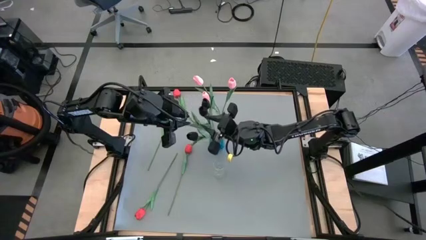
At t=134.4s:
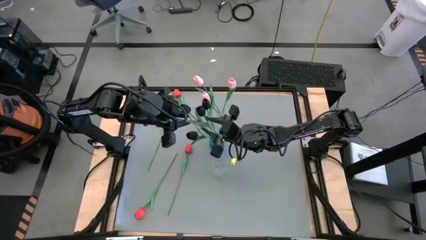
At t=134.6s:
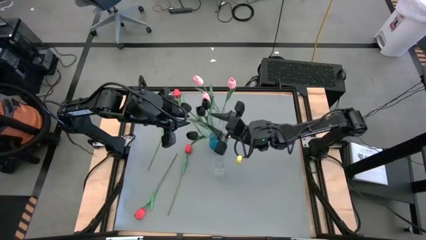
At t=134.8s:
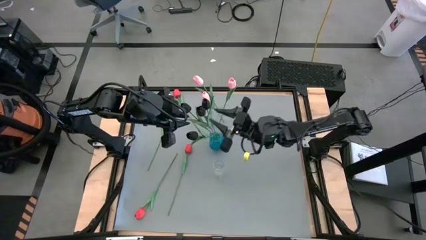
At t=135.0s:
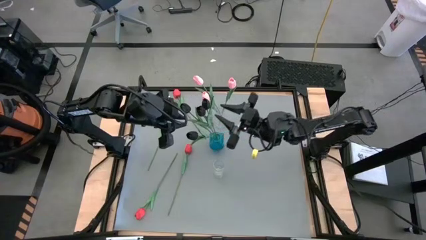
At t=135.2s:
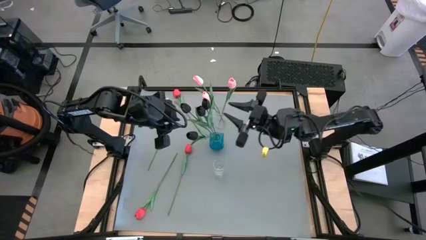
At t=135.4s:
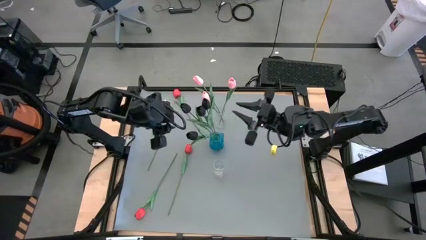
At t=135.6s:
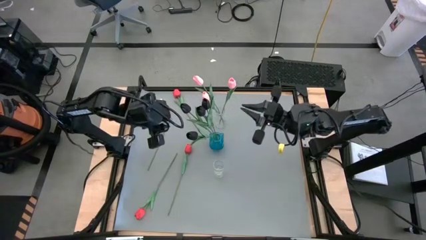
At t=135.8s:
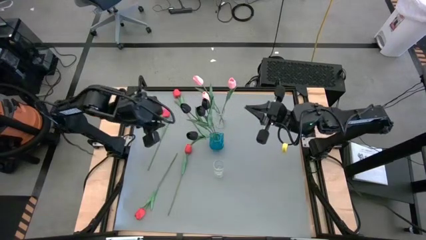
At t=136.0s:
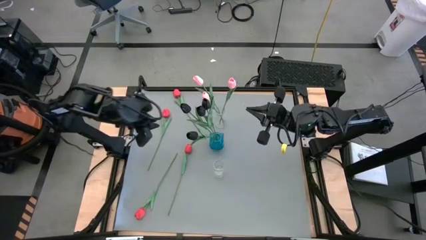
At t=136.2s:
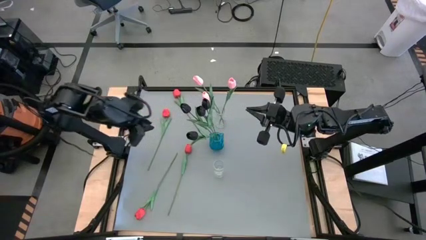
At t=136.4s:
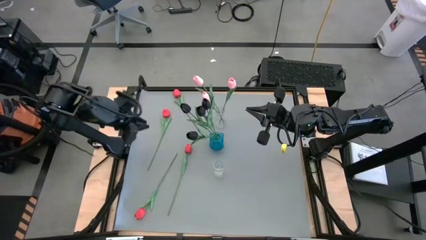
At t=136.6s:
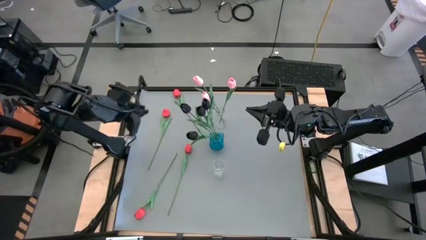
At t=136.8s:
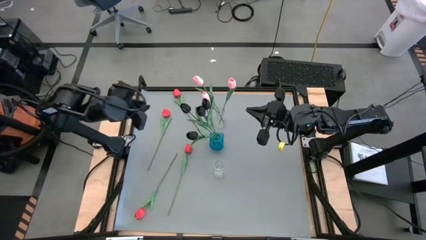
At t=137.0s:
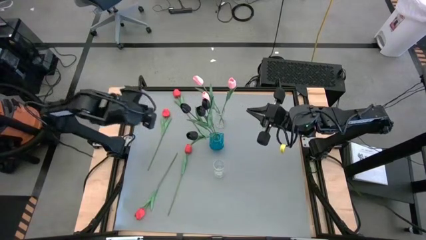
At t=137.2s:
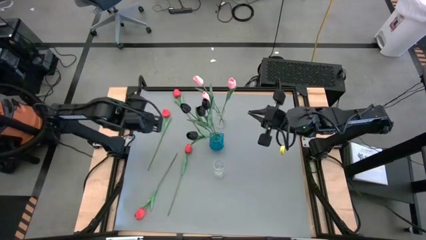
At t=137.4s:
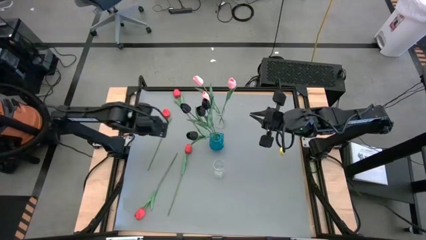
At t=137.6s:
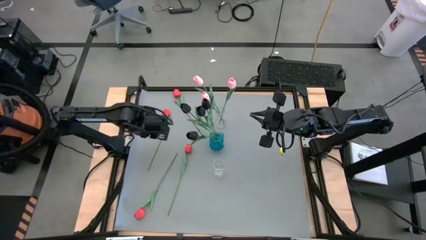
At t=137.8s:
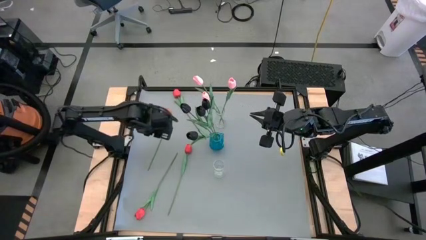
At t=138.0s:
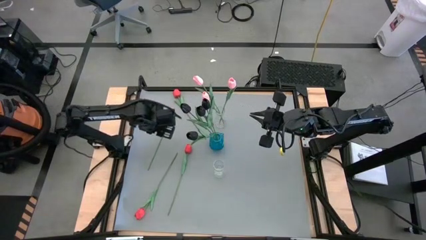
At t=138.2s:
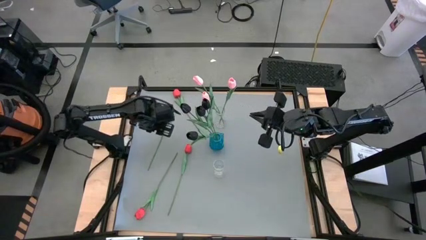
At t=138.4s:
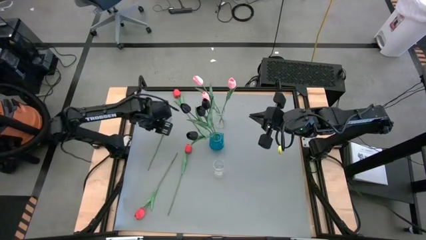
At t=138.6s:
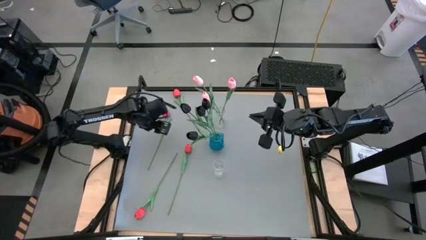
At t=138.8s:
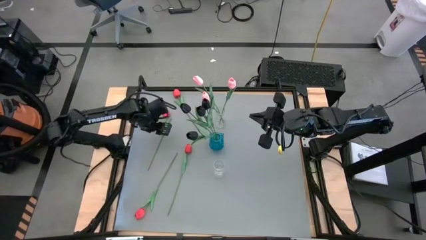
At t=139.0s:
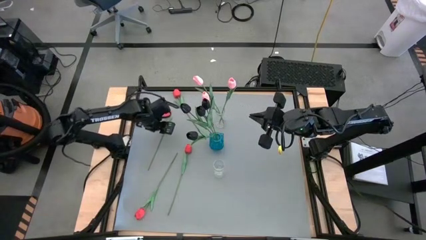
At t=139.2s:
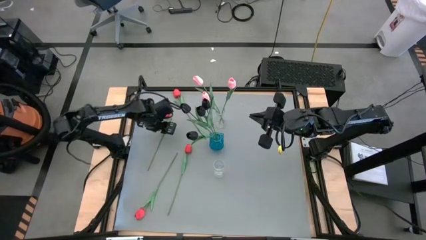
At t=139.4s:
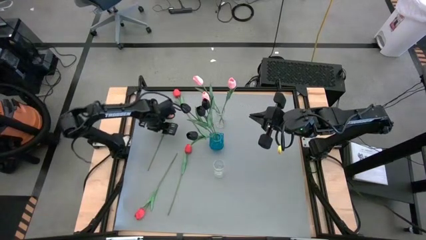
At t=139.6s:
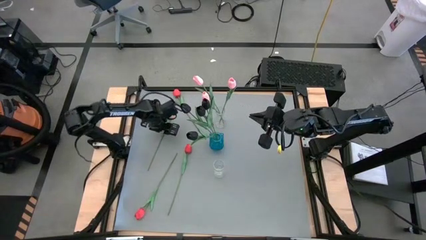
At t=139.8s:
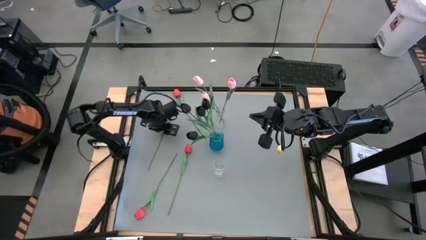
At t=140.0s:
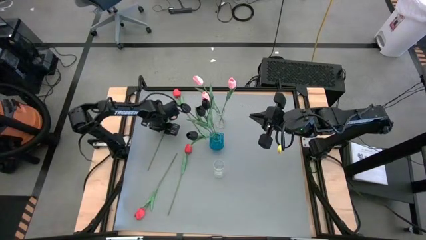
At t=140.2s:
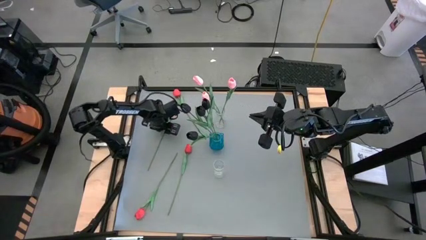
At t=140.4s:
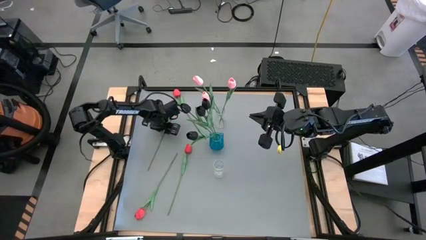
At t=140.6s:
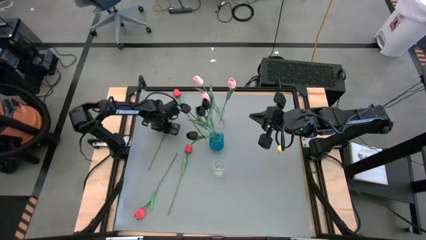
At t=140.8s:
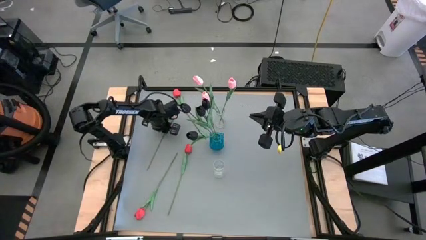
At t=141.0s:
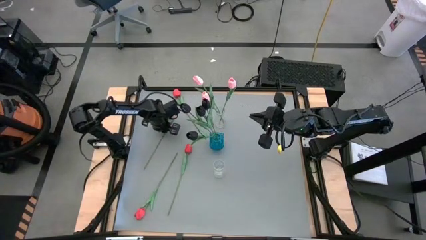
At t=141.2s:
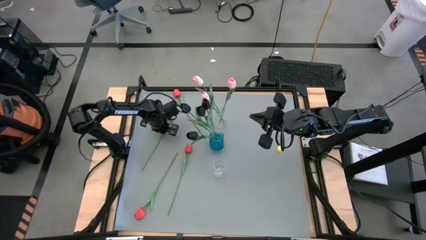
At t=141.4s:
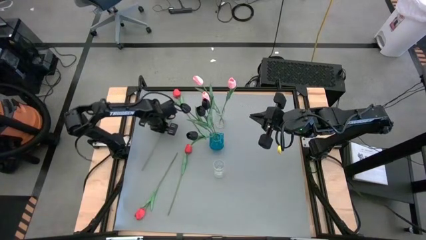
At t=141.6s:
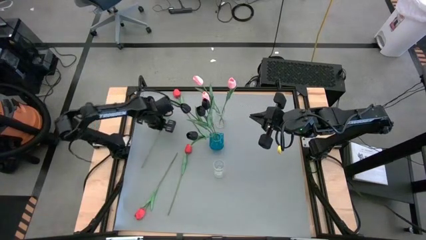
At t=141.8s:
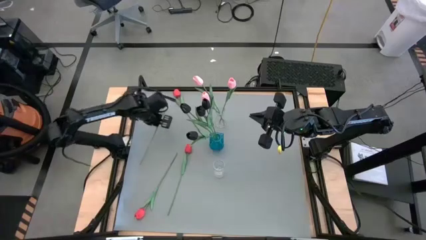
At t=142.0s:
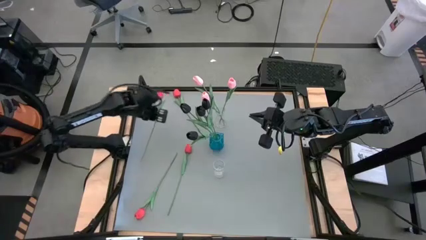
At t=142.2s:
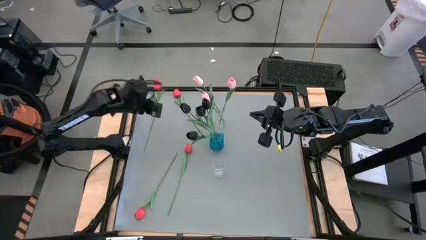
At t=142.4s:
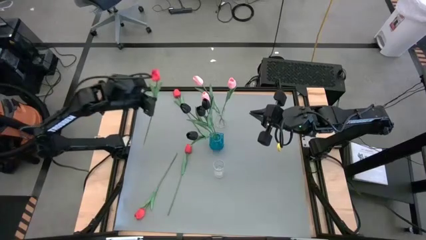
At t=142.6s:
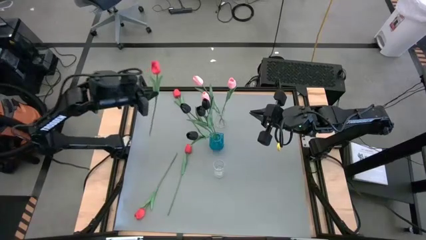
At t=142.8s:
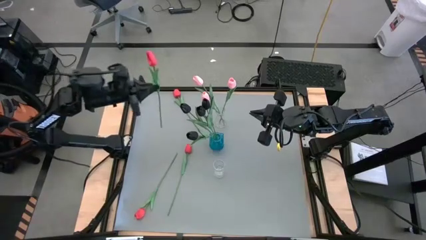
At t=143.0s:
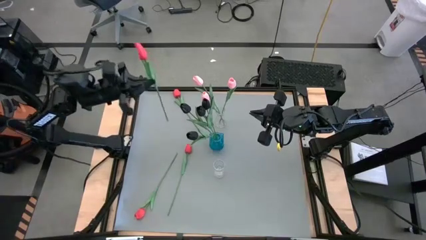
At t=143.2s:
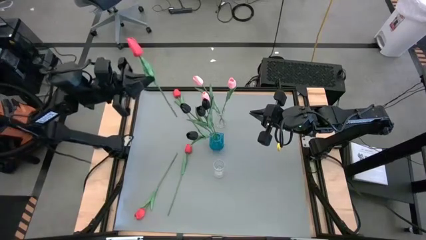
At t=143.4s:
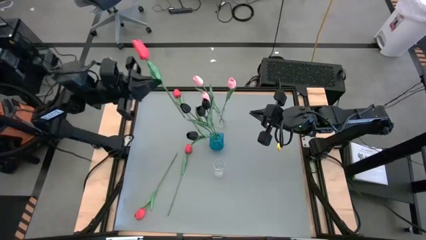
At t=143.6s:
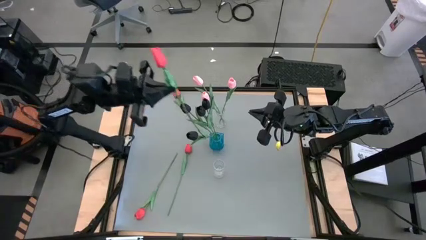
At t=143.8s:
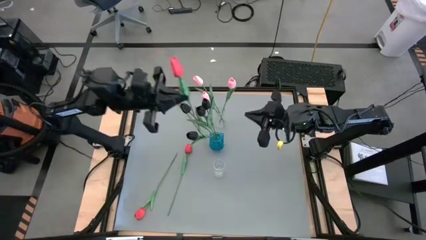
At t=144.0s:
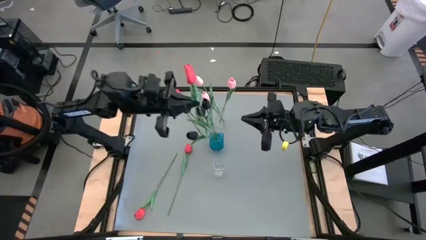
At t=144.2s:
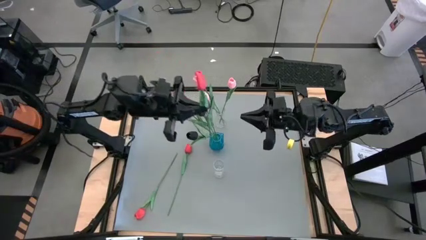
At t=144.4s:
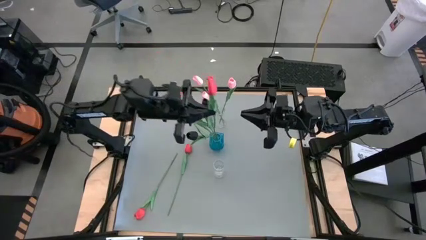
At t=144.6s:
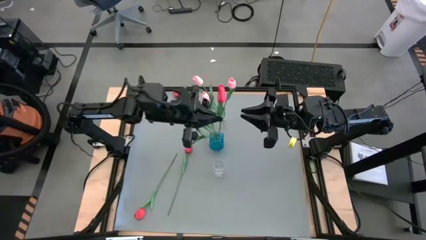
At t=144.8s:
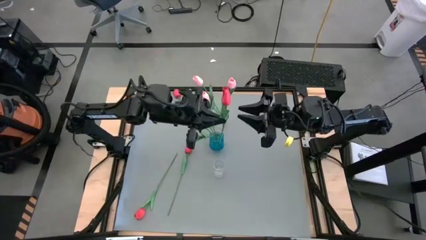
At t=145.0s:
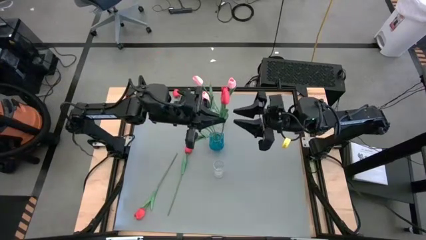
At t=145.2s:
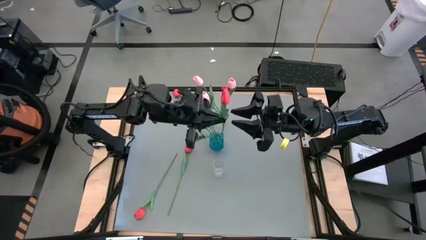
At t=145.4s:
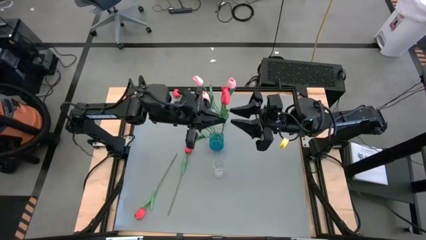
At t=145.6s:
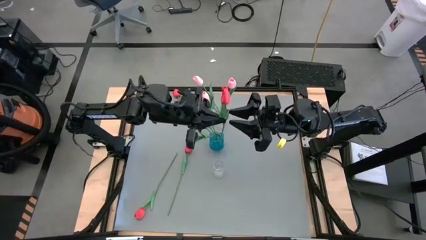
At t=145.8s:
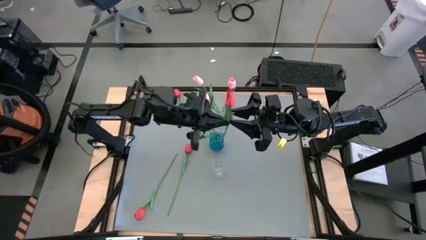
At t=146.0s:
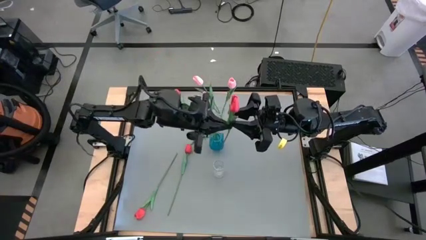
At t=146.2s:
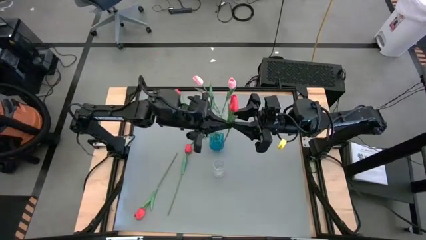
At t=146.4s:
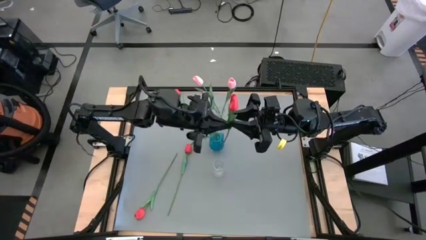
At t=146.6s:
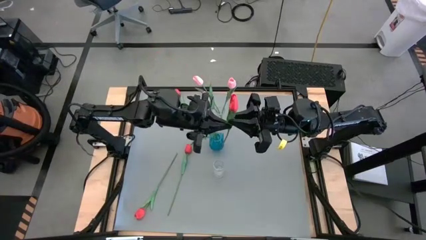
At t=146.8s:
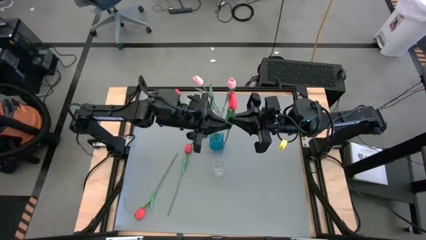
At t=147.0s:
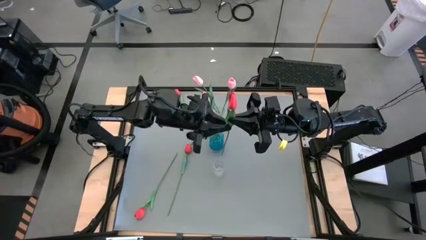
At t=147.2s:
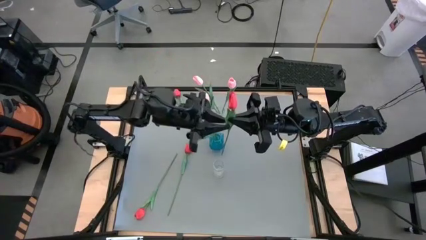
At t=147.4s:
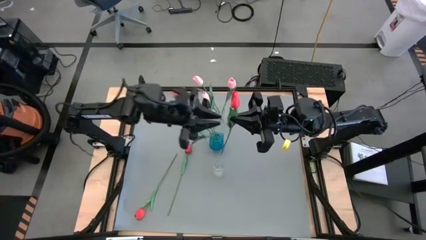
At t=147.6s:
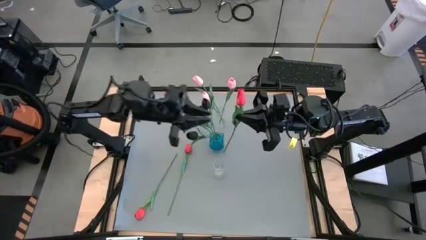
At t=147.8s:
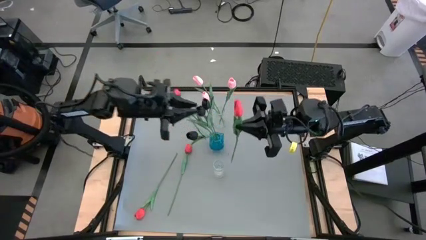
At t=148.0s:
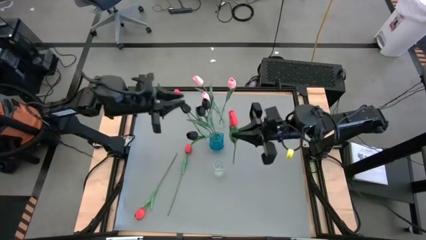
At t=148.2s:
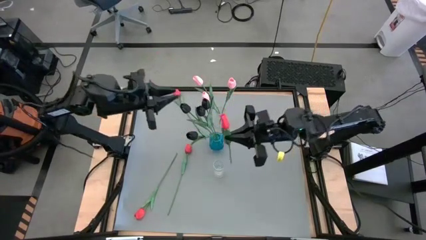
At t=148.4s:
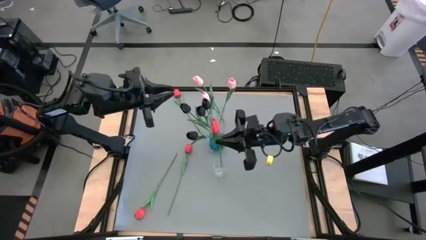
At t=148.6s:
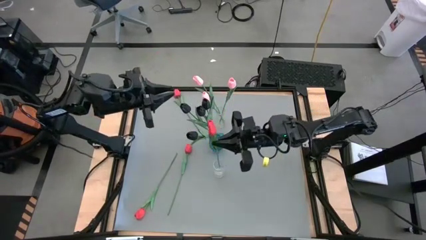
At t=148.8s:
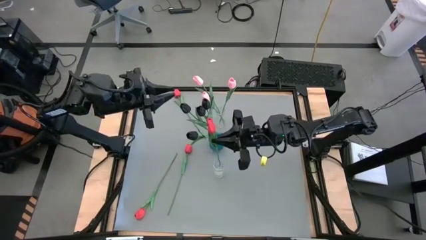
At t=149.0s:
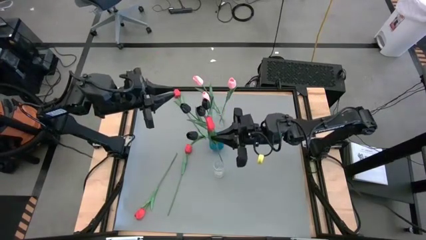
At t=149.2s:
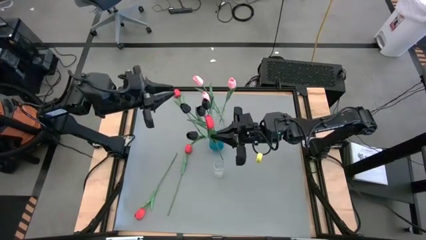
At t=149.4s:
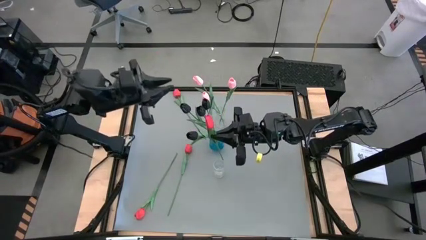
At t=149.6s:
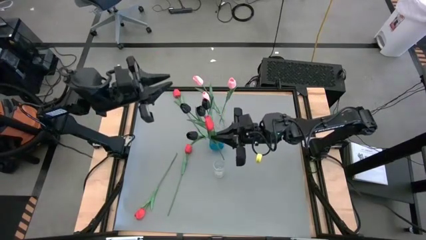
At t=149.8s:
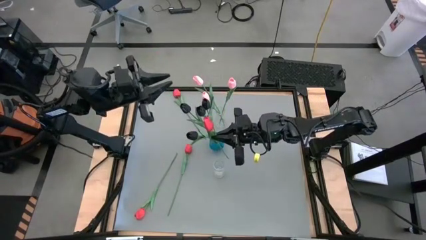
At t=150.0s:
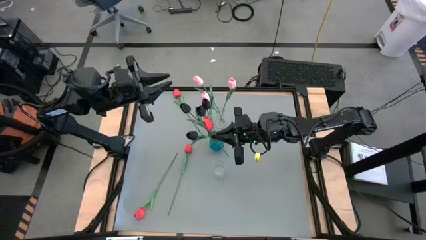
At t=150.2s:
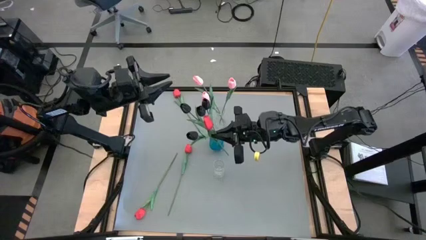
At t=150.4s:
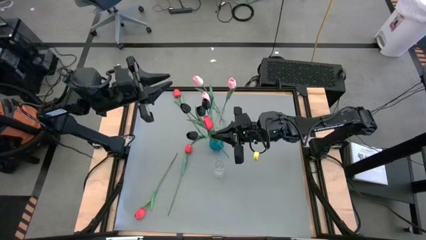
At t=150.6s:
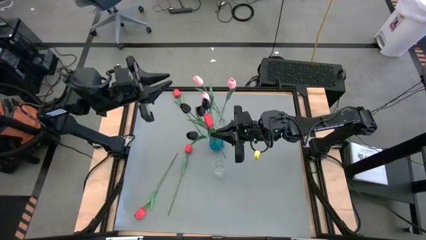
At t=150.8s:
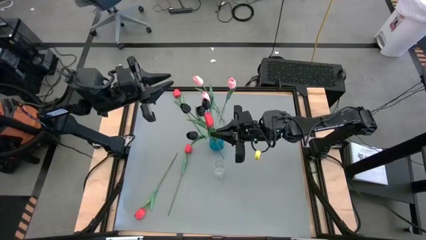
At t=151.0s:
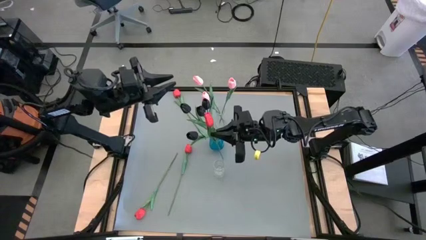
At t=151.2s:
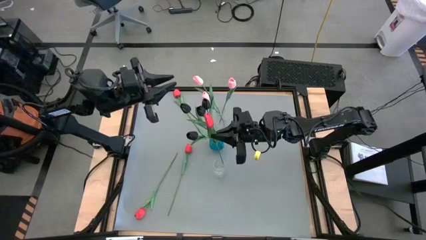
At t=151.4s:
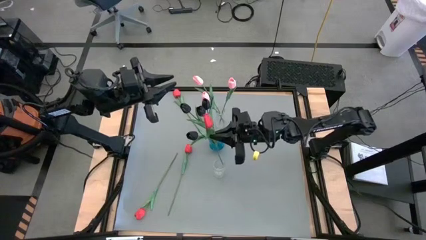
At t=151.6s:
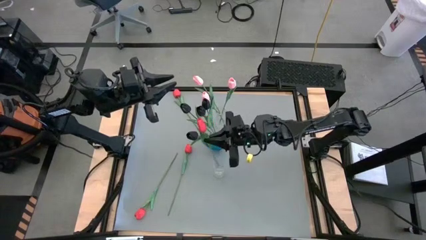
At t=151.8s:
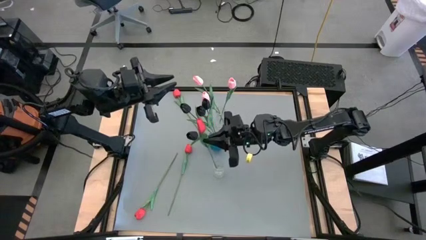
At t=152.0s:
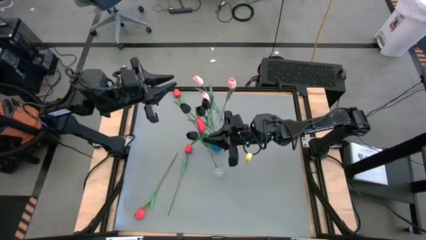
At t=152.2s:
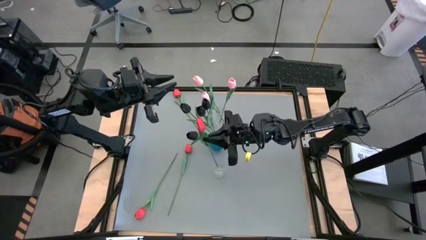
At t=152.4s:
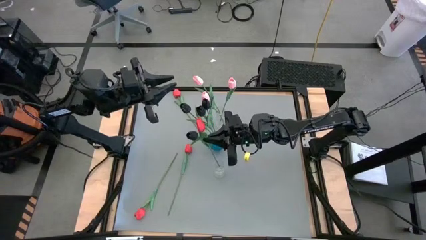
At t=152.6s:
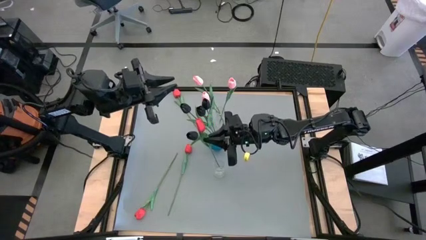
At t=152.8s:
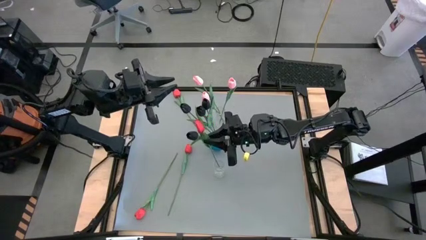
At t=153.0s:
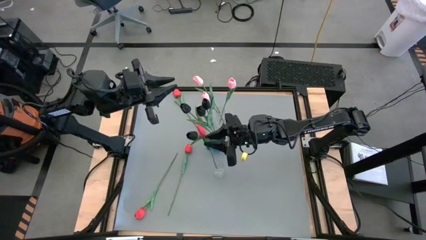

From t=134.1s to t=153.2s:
Task: Sort flowers into vase by color
Put the top left red tulip into the bottom transparent vase
